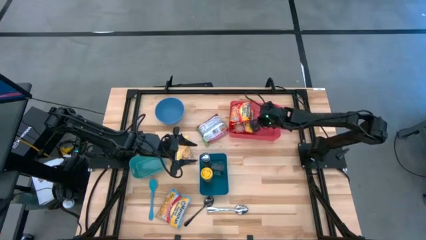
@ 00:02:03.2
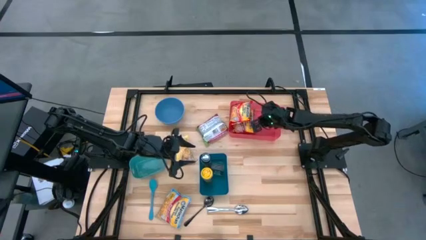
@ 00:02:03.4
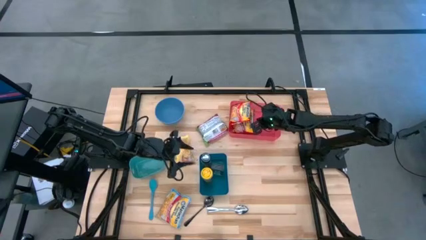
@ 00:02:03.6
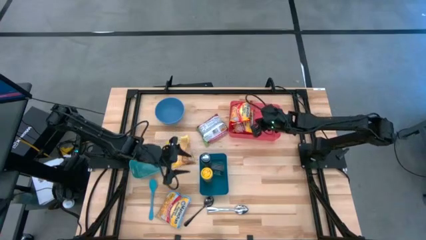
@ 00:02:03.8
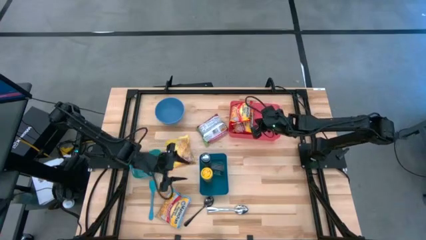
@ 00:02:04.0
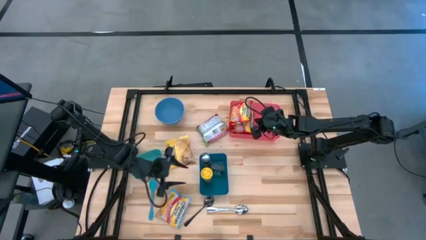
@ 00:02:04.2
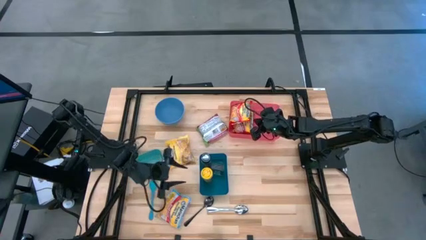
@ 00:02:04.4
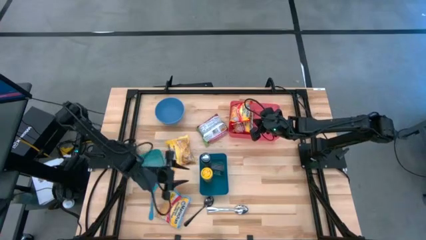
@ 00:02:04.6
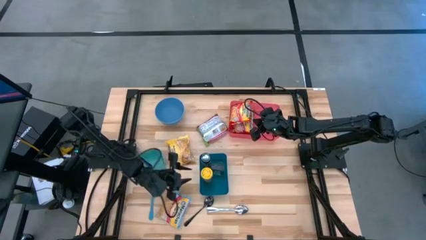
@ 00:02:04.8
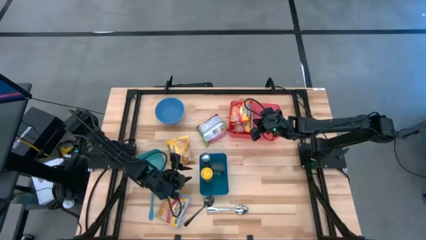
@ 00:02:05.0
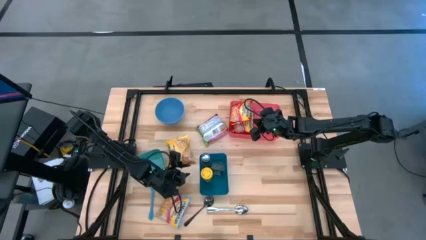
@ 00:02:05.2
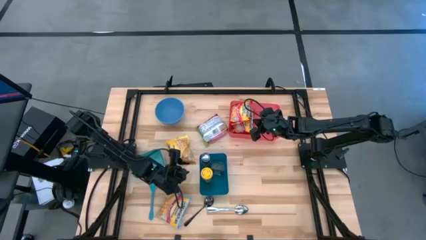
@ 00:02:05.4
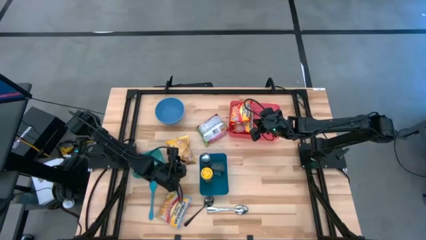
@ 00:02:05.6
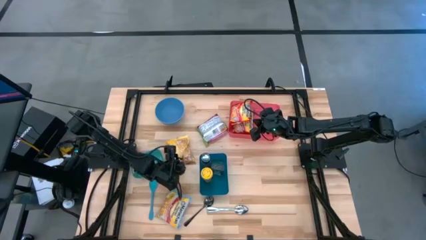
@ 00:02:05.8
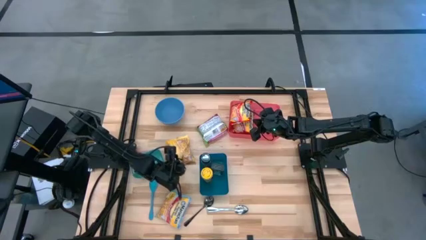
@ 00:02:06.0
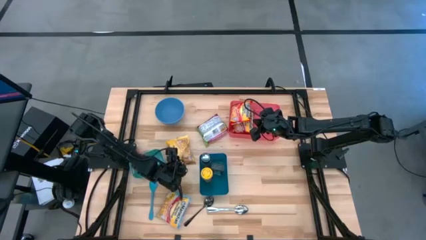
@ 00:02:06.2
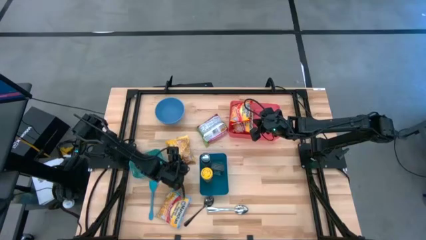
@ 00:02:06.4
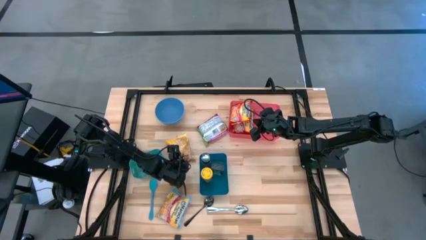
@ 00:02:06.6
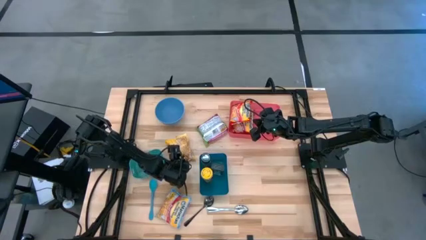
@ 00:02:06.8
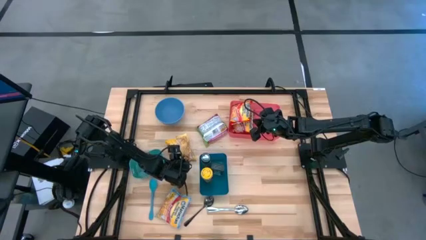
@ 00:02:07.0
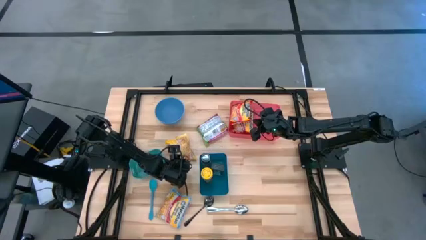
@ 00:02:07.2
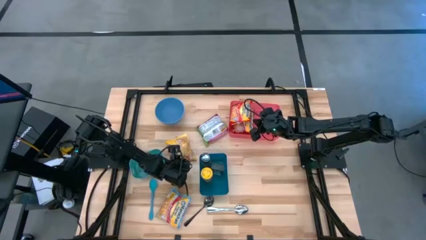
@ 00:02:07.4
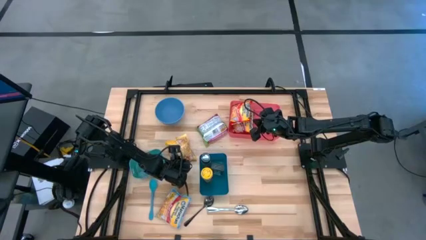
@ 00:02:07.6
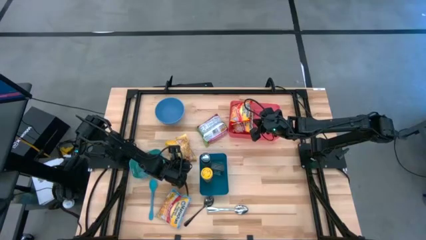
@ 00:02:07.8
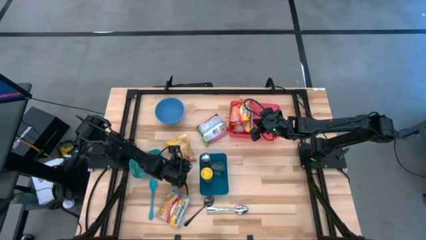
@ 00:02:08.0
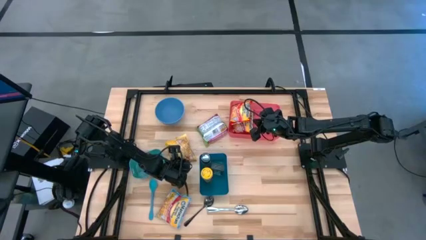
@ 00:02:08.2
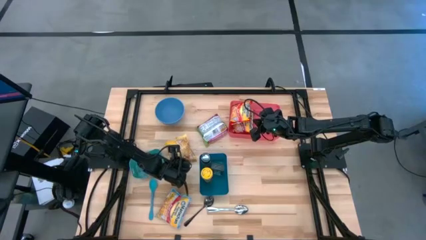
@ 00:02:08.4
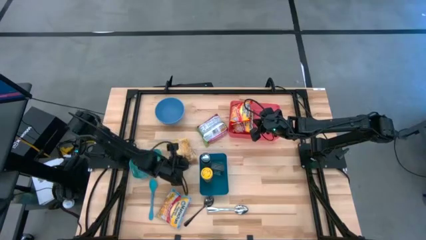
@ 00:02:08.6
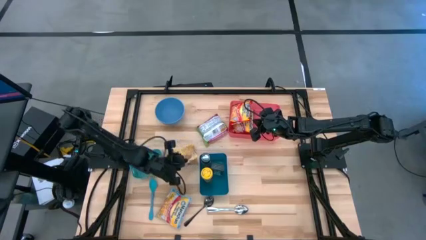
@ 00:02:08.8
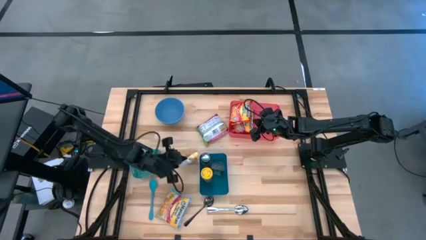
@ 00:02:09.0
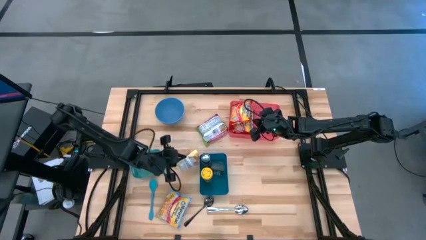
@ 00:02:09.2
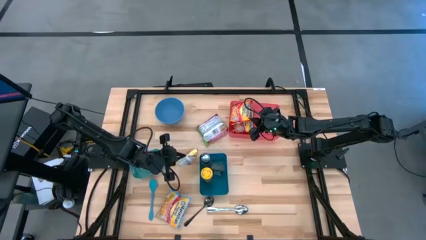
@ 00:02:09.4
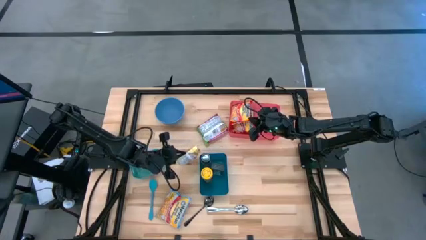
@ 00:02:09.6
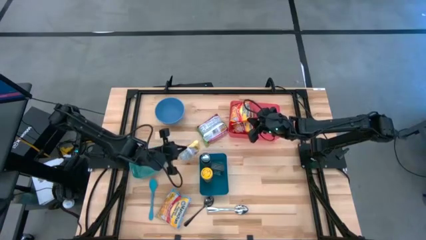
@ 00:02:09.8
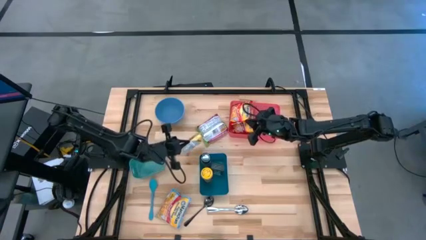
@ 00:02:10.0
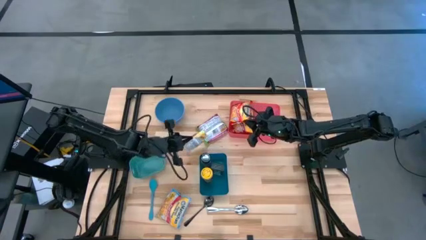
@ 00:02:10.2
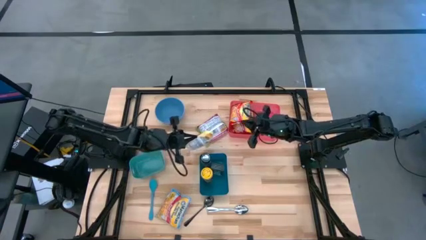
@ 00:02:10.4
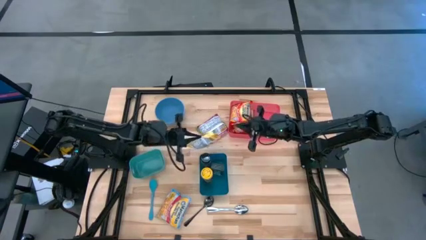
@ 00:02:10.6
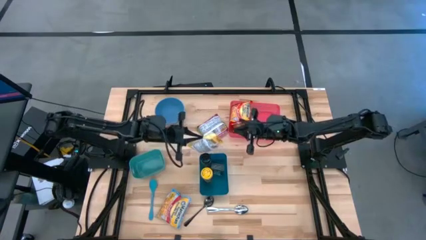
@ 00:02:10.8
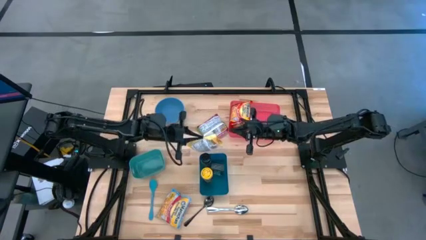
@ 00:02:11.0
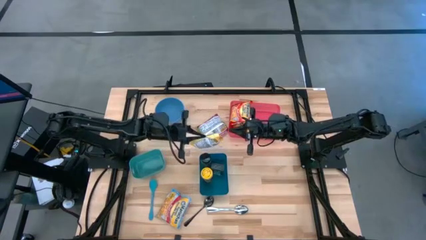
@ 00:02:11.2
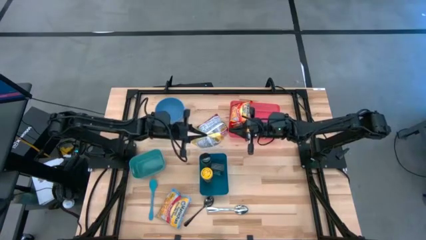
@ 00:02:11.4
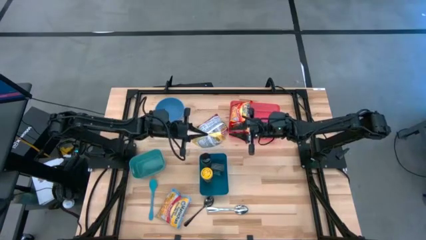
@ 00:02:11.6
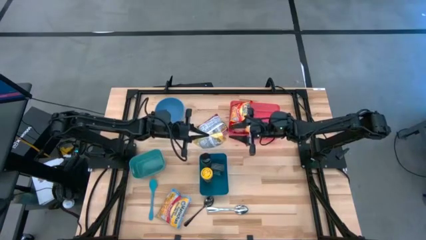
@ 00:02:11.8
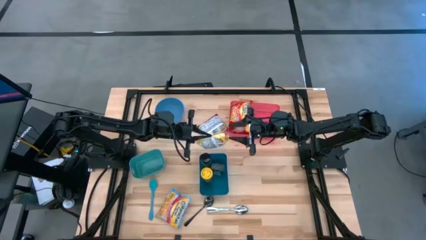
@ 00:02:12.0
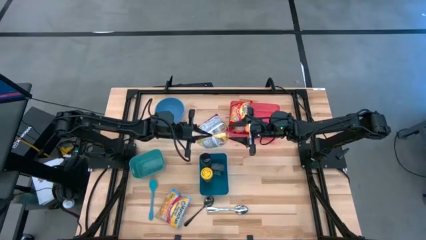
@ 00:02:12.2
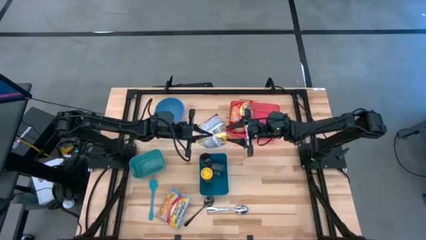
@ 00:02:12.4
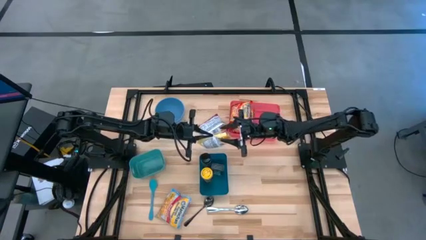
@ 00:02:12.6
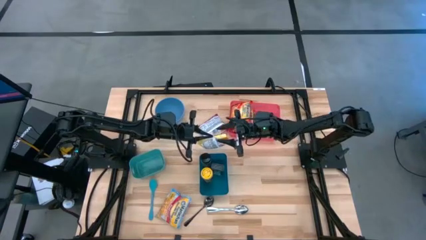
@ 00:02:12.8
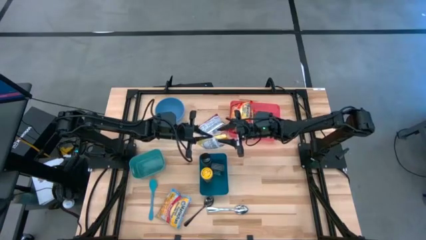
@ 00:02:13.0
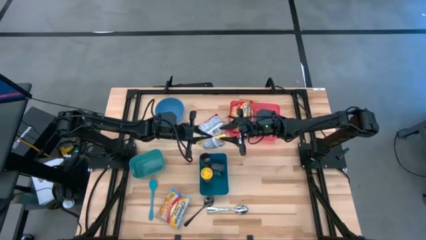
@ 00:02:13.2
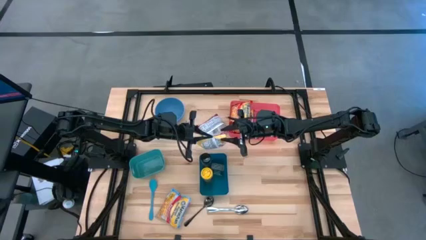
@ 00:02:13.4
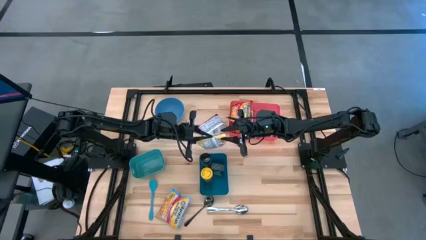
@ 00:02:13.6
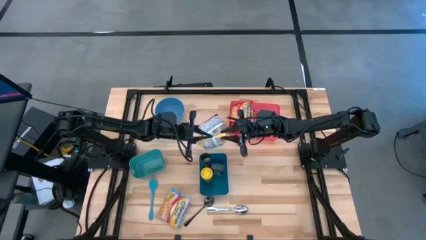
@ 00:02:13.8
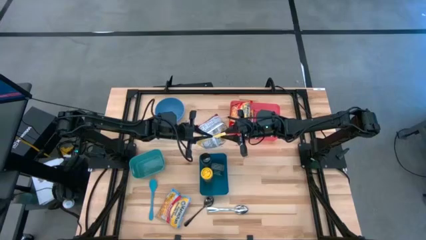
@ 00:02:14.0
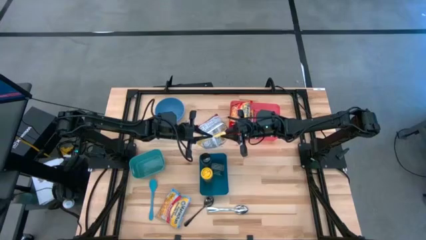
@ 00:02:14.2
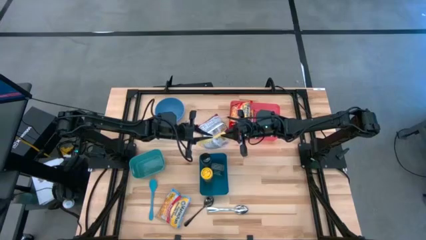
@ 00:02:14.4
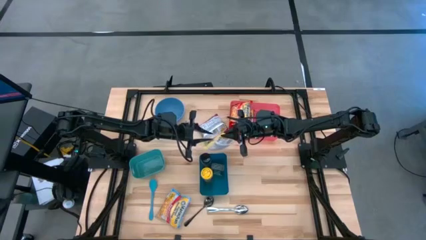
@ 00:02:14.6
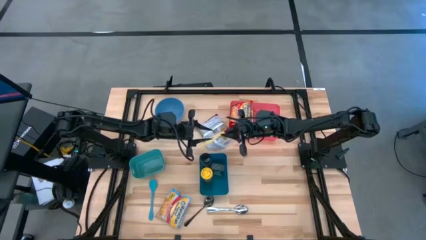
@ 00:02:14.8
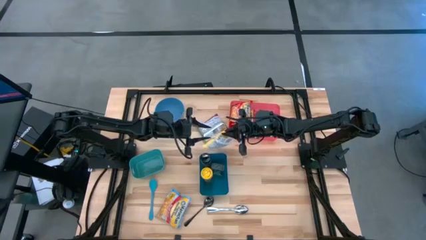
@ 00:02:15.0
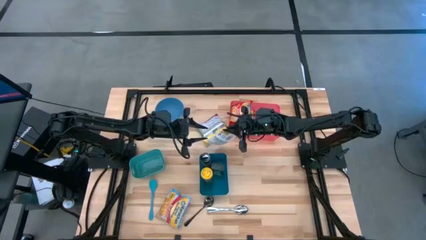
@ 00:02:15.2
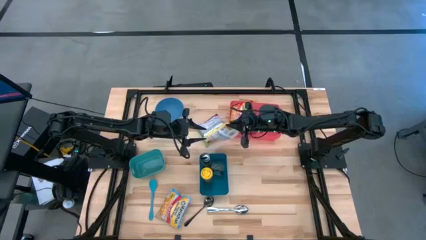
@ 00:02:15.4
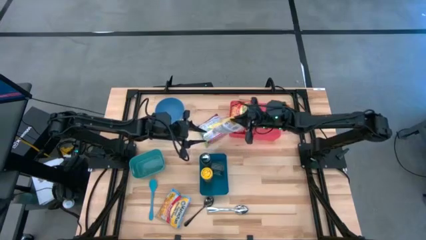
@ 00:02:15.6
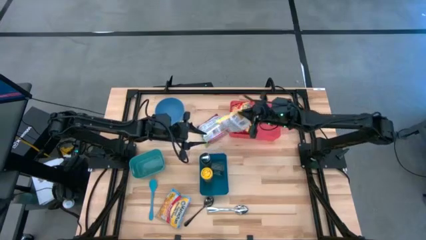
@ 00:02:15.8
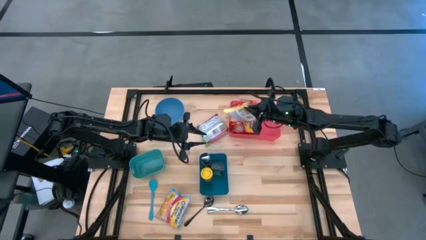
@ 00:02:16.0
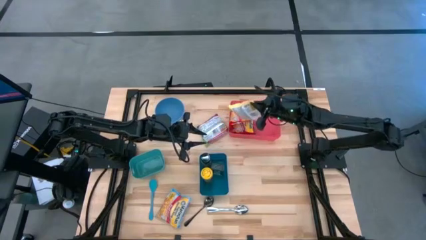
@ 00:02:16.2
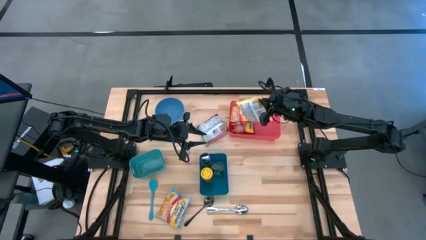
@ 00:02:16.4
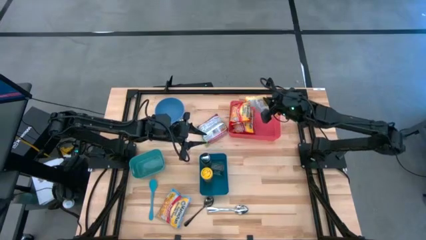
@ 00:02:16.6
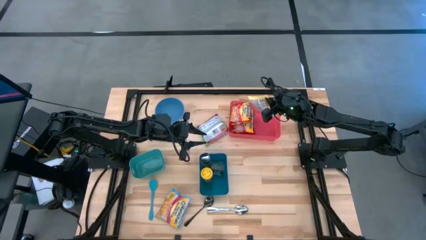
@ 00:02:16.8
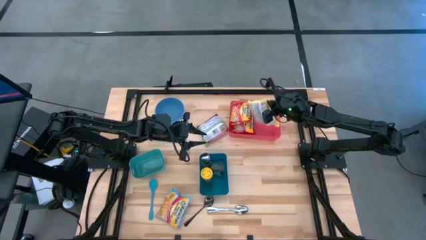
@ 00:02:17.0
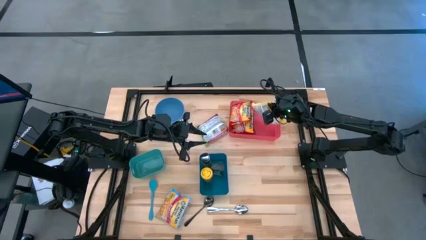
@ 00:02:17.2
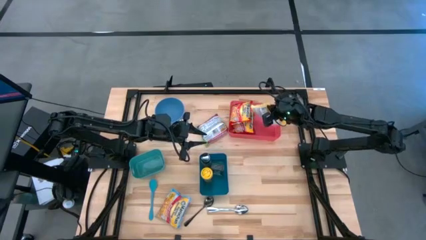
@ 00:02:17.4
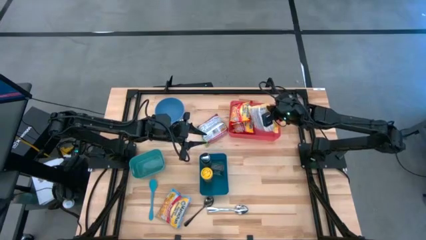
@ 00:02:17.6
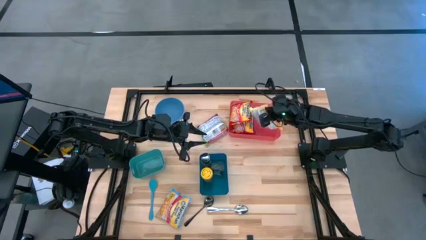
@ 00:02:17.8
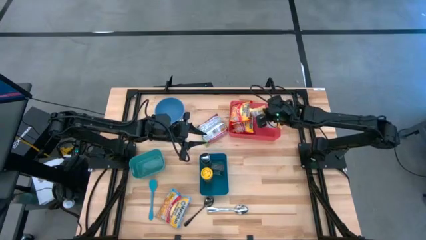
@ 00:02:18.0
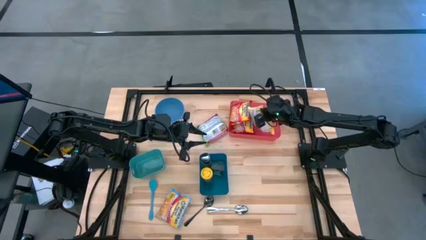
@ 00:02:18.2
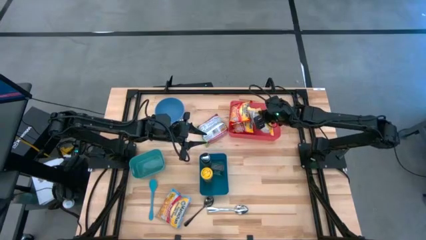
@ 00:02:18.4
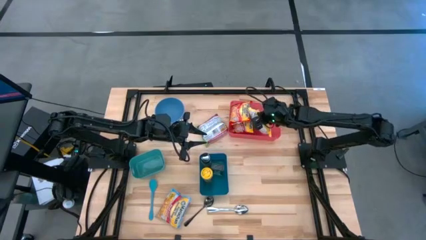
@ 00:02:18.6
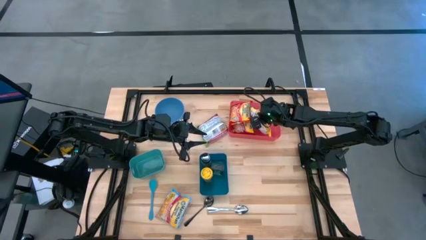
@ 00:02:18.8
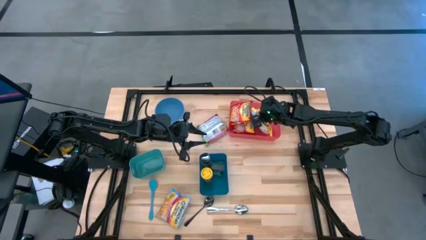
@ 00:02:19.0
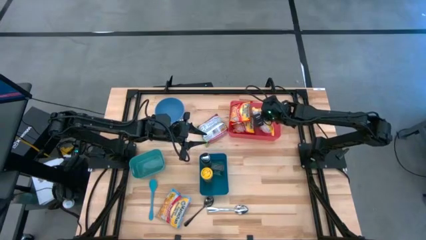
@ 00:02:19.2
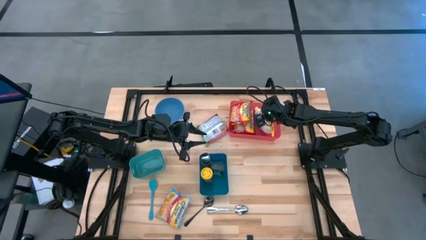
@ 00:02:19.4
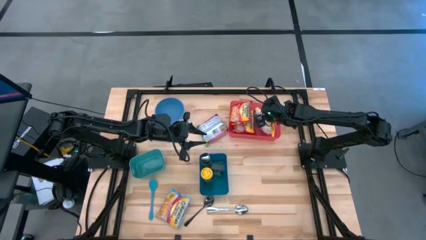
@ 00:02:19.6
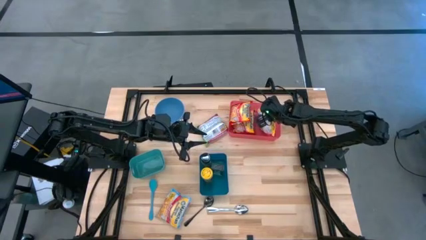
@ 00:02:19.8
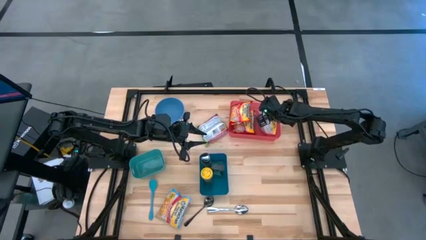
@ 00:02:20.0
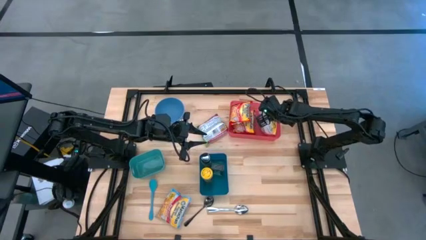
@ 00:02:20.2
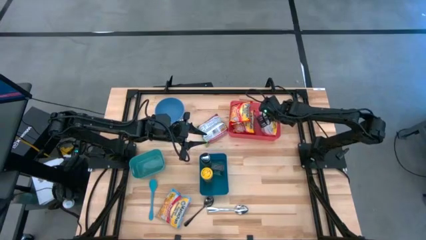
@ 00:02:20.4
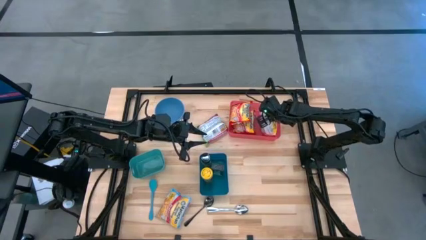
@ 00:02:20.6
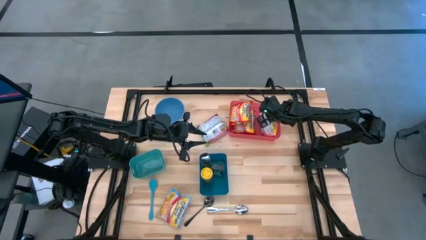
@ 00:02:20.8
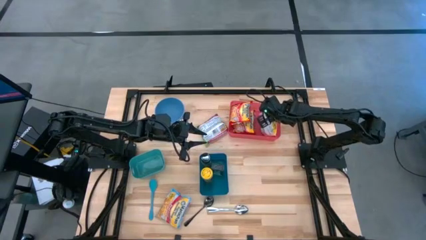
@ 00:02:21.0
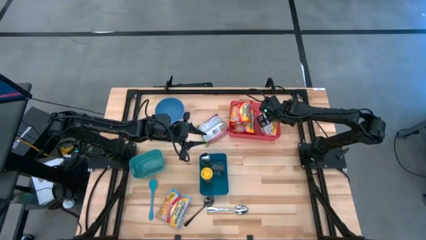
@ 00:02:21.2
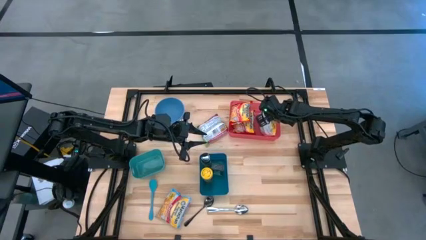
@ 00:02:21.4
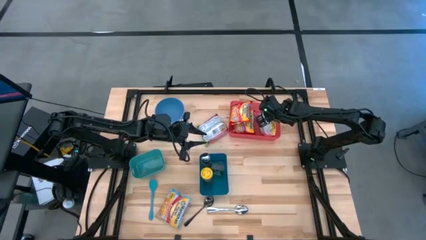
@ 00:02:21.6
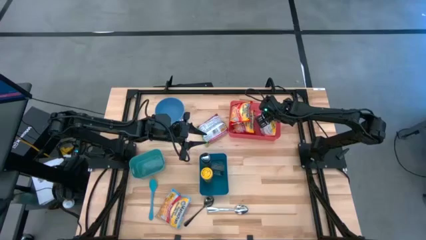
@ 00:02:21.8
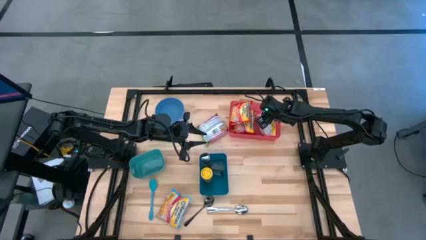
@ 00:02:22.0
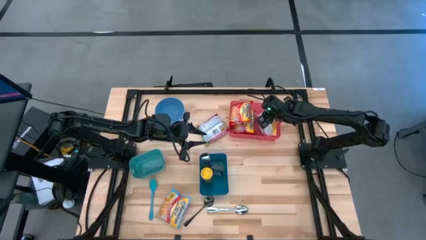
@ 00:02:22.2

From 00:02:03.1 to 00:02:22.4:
Task: Pick & Place Food Item
Put the yellow noodle pack into the red bin
